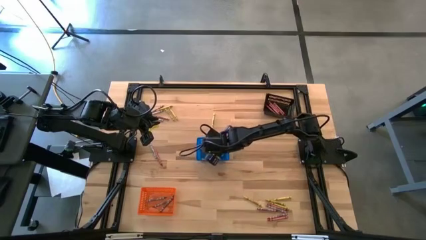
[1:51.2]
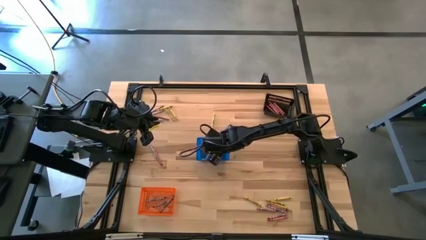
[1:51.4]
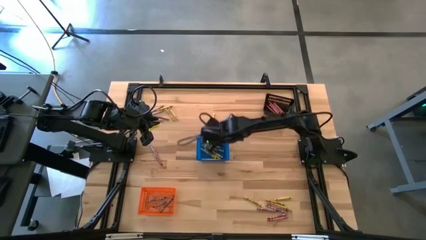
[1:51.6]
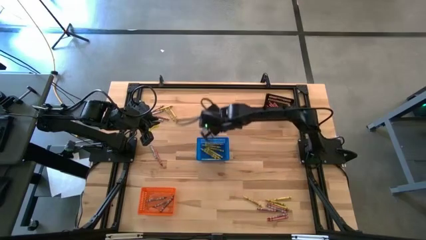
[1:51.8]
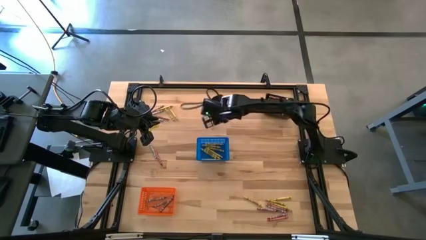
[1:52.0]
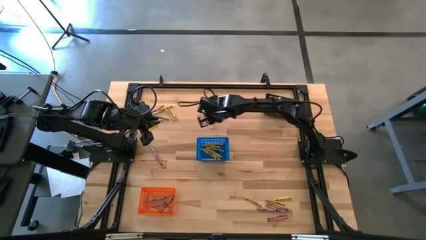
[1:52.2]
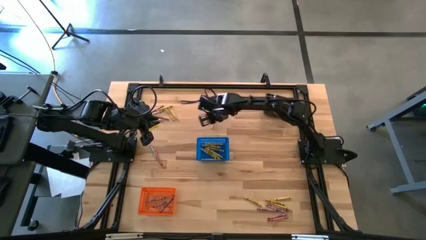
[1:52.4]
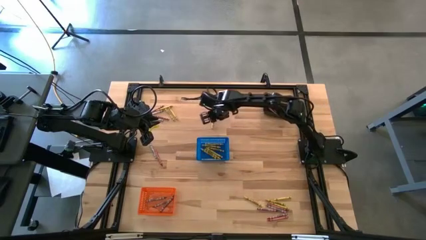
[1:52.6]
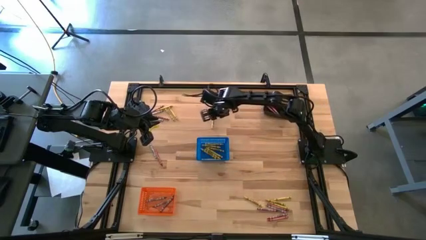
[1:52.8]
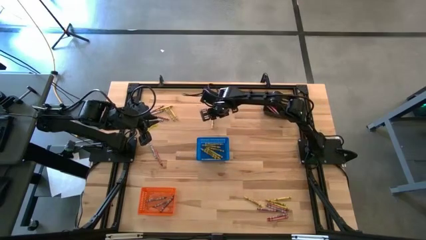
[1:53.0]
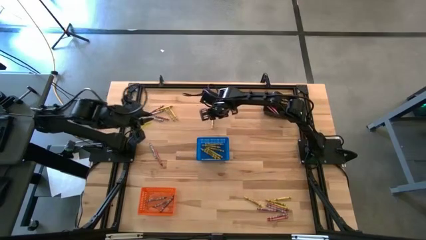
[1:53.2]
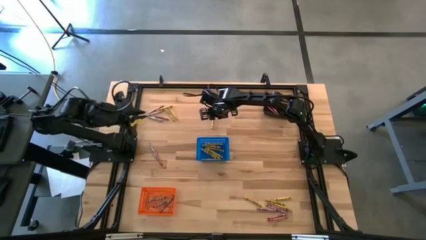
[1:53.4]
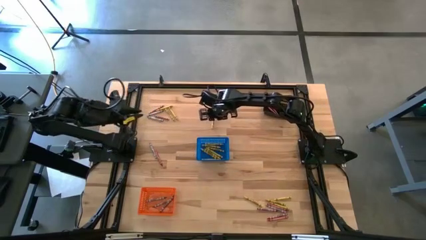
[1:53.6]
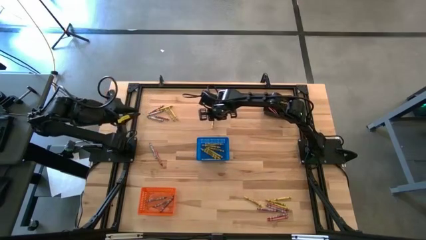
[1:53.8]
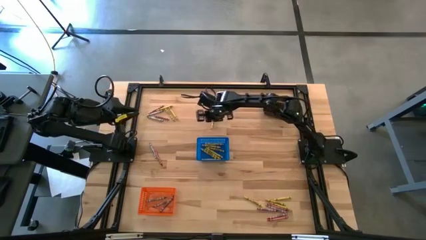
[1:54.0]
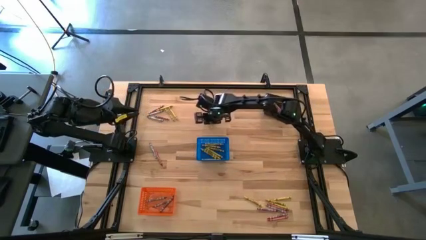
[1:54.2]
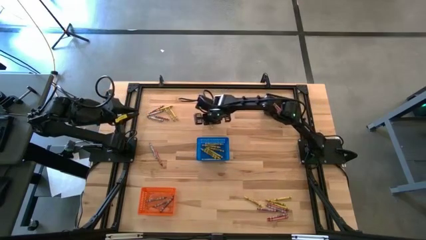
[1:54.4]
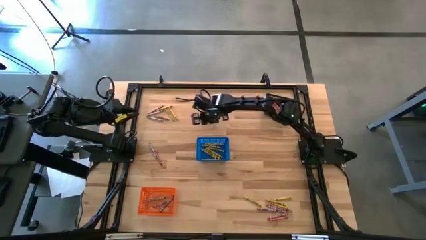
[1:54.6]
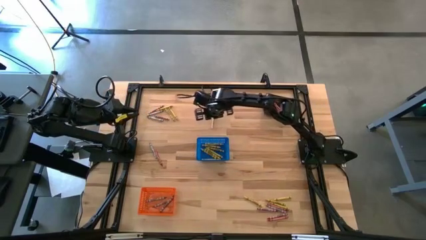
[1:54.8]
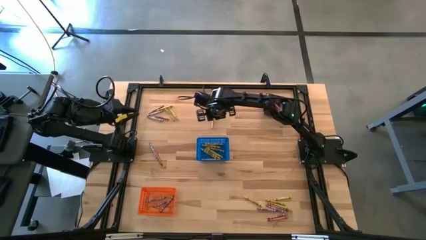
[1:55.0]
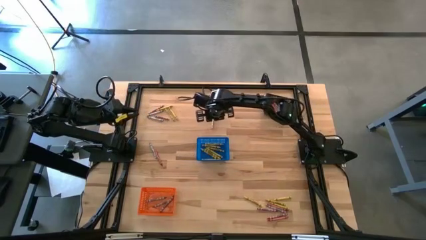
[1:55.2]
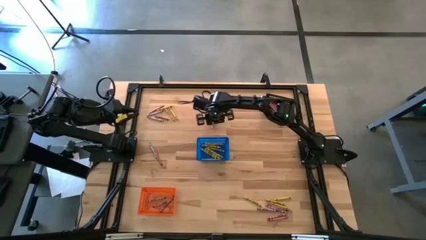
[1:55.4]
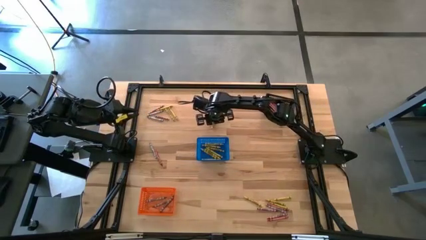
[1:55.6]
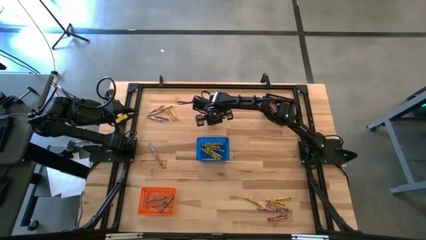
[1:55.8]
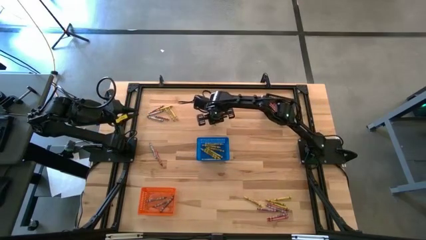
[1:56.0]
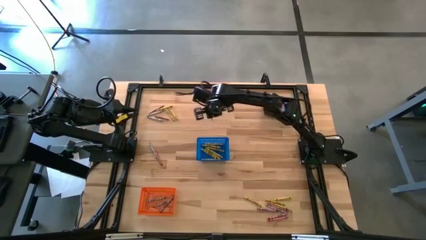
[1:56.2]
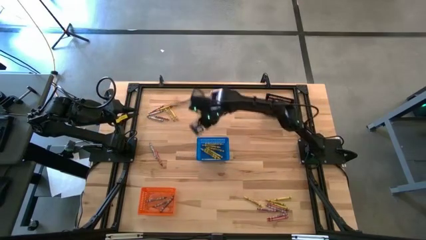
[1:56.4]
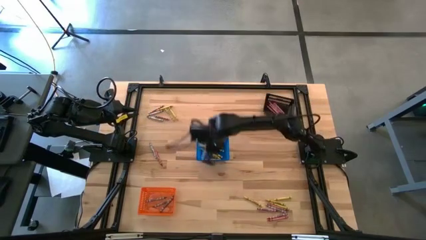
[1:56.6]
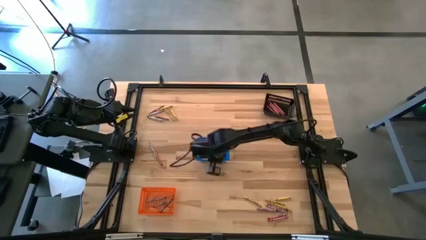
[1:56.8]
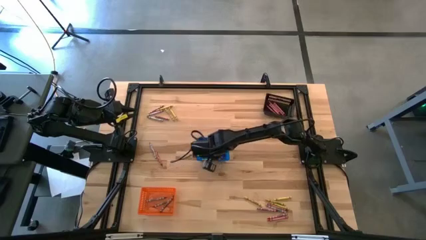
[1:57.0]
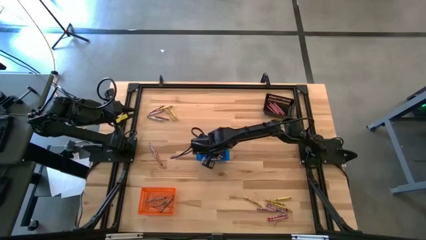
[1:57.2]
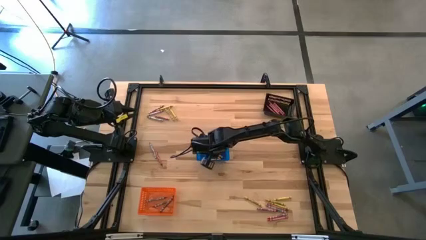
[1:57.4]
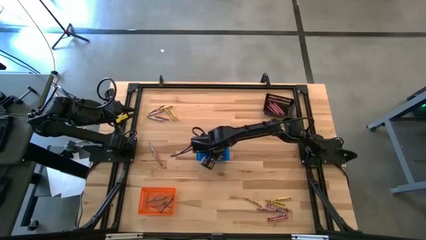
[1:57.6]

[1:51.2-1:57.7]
Task: Sort crayons
Put the yellow crayon into the blue basket

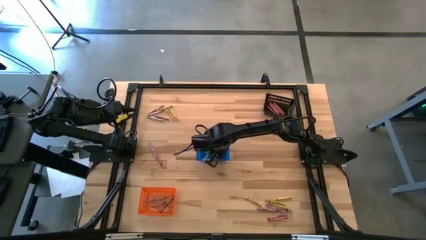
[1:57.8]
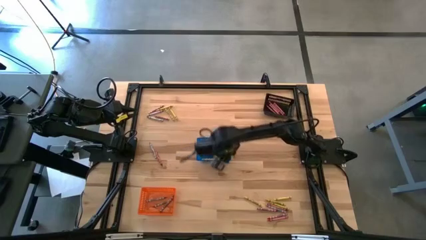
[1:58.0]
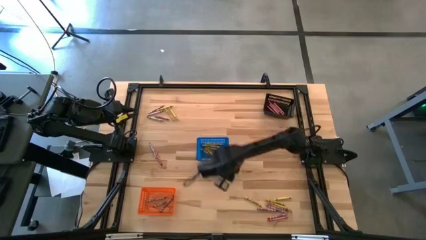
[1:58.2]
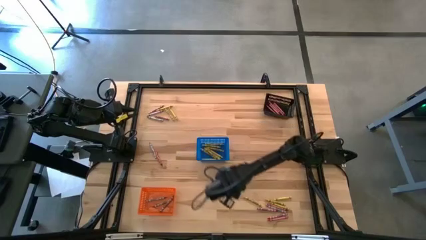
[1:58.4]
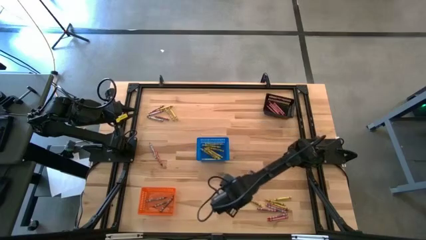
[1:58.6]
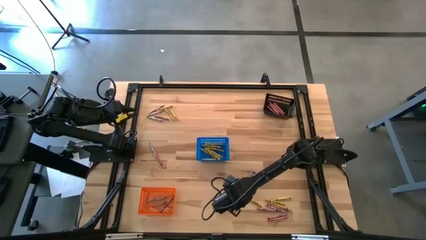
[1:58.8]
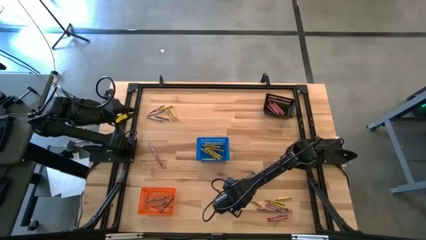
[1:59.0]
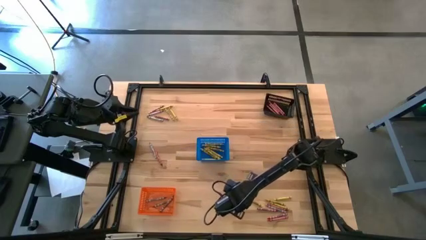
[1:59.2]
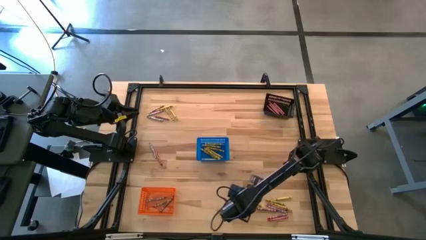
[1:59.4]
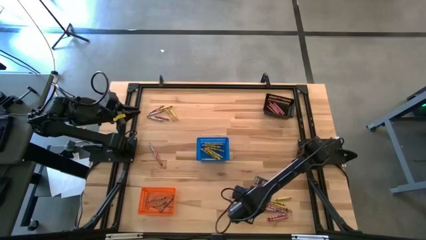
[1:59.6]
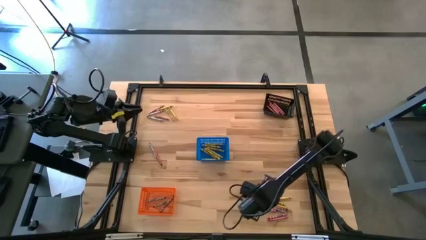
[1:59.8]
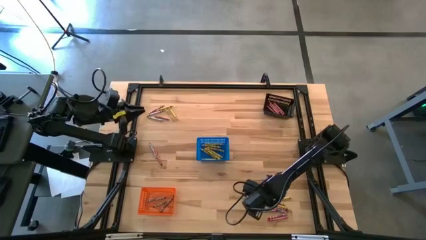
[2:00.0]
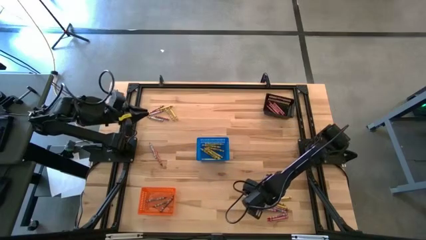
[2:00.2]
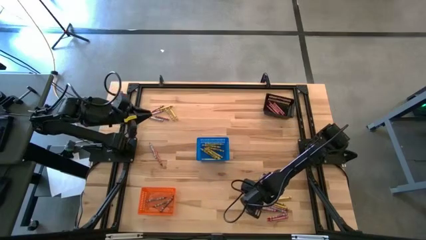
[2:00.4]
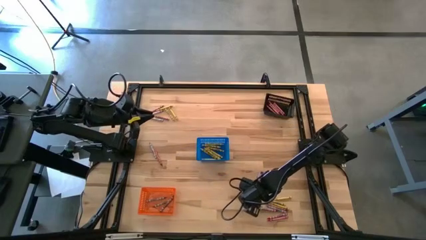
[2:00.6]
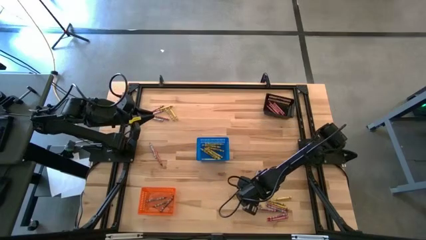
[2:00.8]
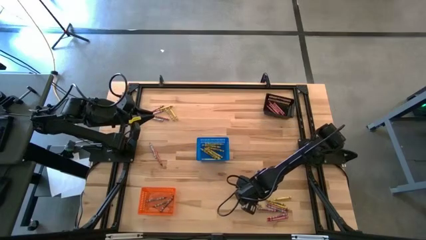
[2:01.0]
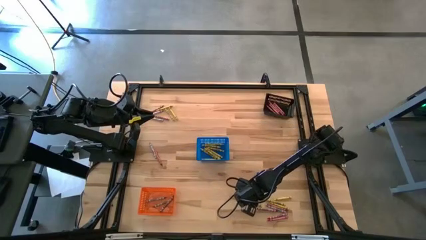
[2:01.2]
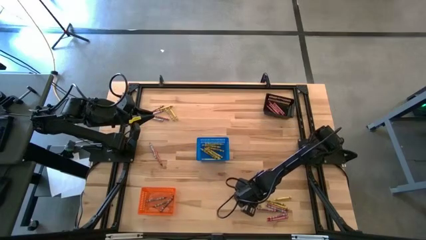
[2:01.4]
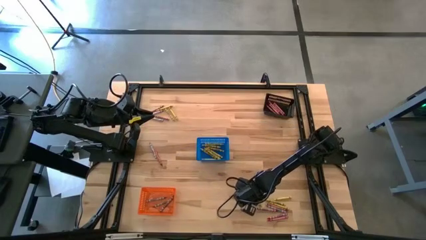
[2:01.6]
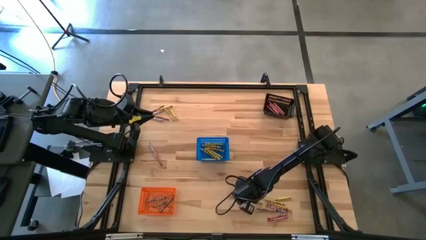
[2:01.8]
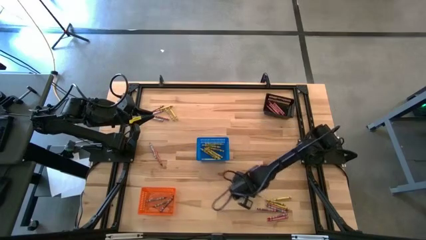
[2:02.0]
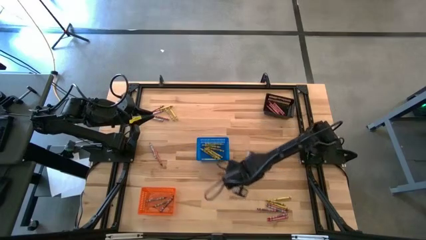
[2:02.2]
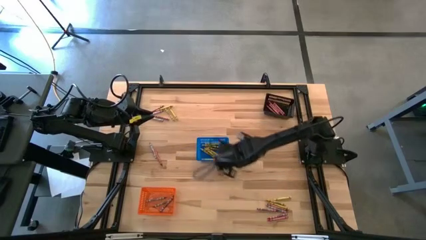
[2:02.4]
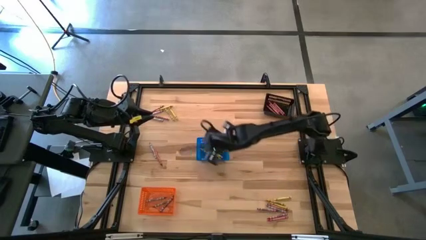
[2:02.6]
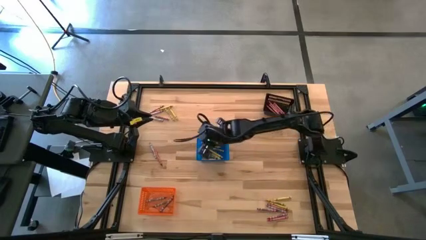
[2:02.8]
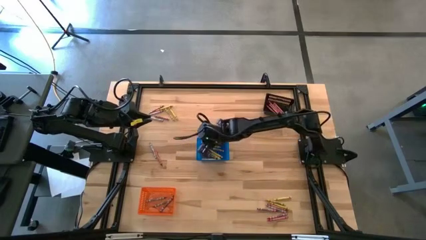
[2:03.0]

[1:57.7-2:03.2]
Put the yellow crayon into the blue basket

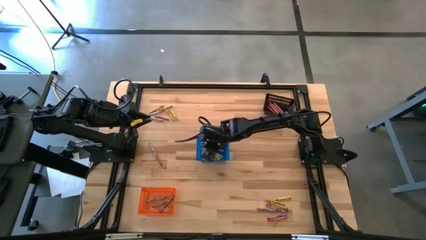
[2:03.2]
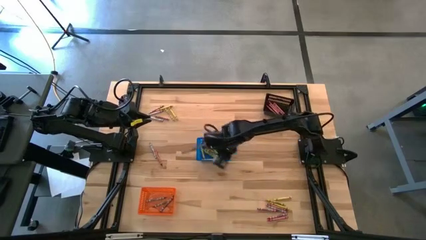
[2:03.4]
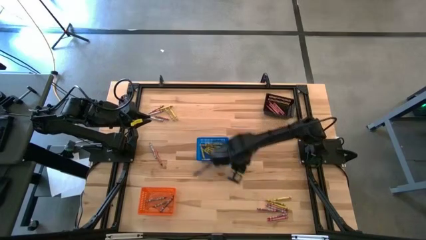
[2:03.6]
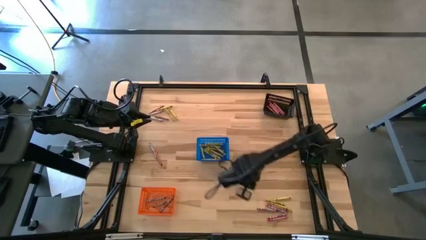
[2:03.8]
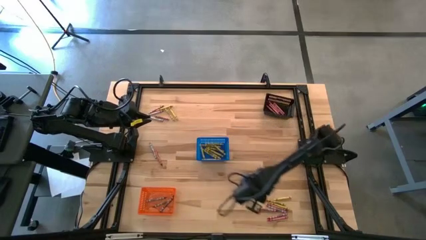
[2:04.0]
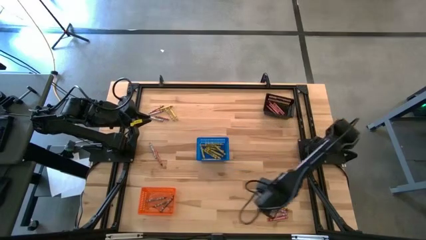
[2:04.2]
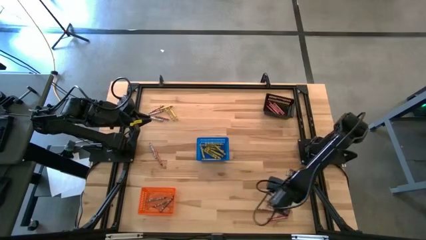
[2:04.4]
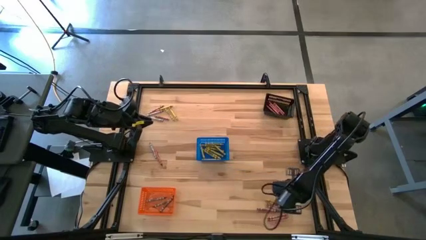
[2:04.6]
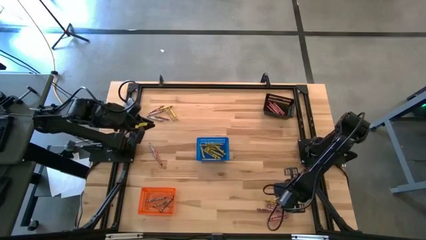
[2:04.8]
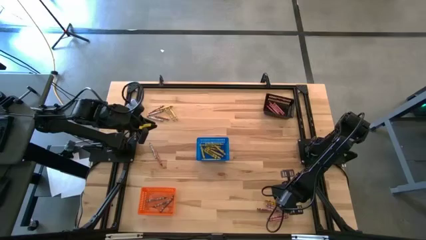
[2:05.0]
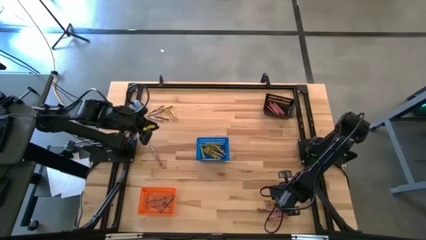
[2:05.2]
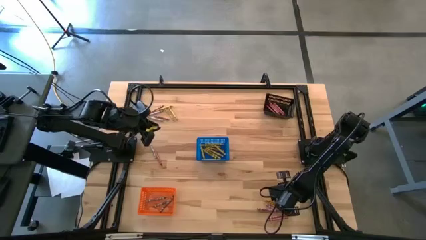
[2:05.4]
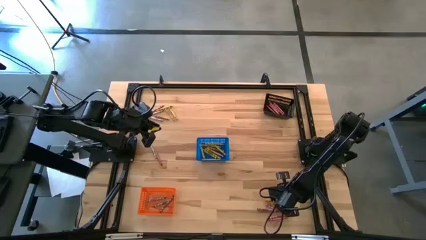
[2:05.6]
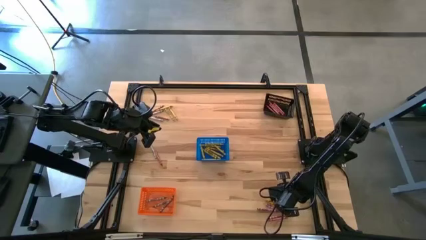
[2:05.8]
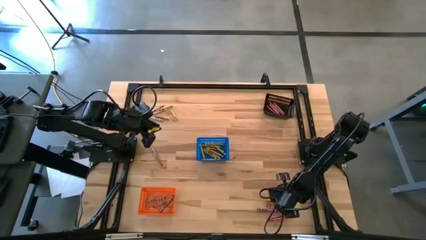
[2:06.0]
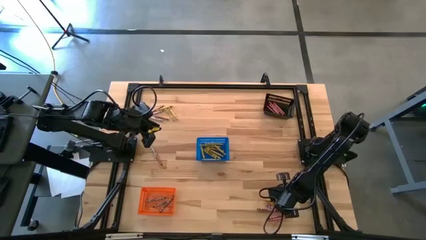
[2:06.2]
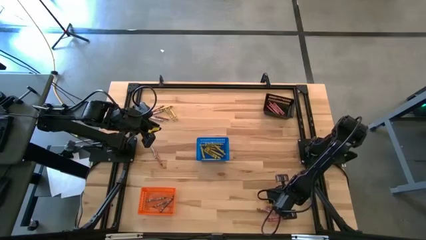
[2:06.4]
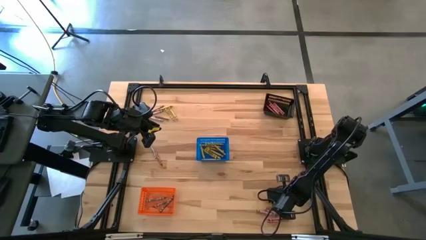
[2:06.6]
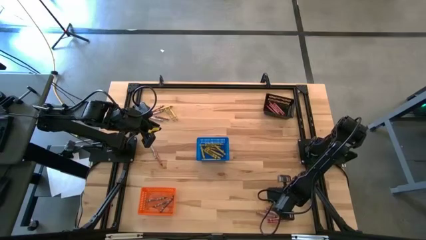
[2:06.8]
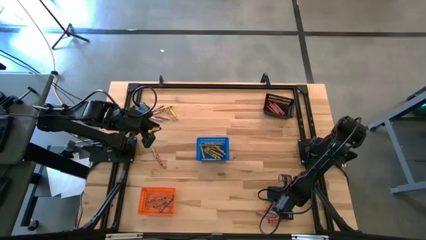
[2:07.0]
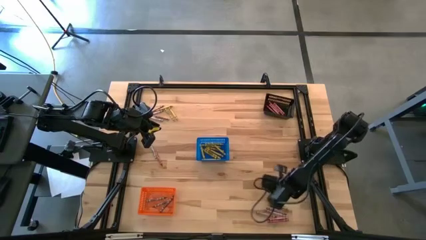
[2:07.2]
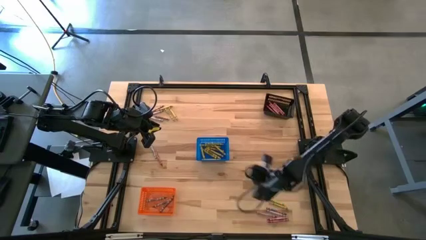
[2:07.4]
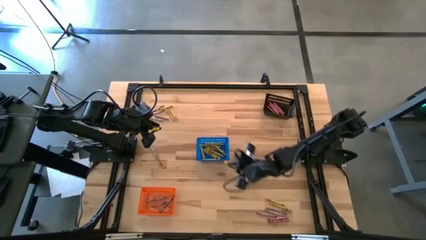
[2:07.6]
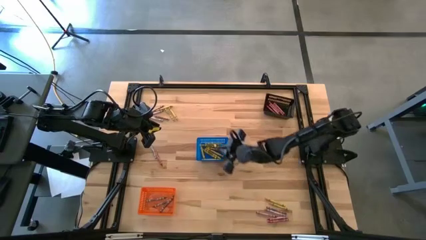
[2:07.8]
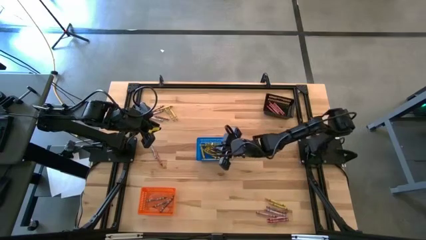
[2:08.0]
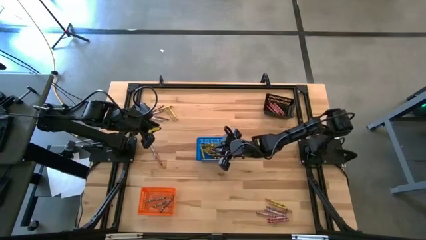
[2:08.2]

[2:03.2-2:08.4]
Put the yellow crayon into the blue basket

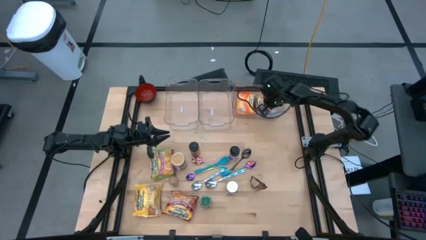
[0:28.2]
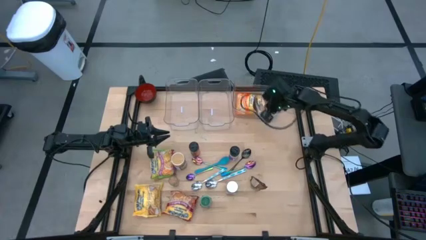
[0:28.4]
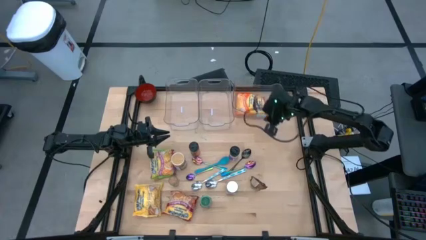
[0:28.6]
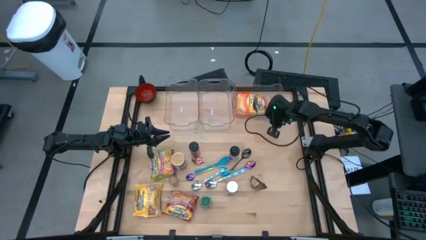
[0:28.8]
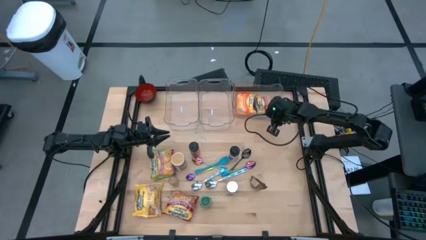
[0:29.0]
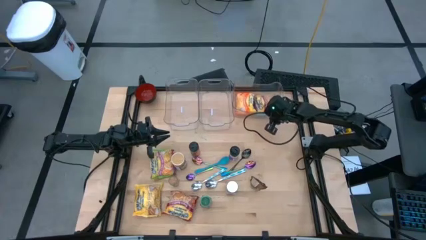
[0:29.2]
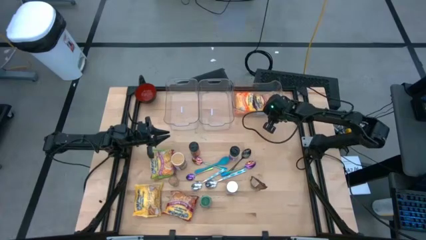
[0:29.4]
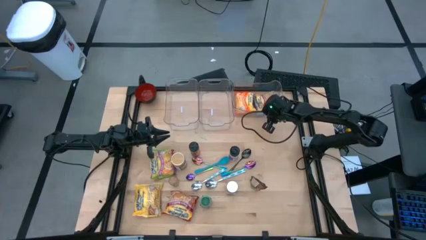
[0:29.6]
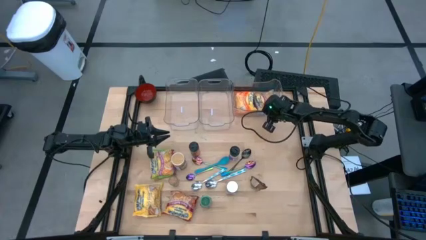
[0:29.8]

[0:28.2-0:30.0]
Task: Pick & Place Food Item
Adjust the right transparent bin on the table
